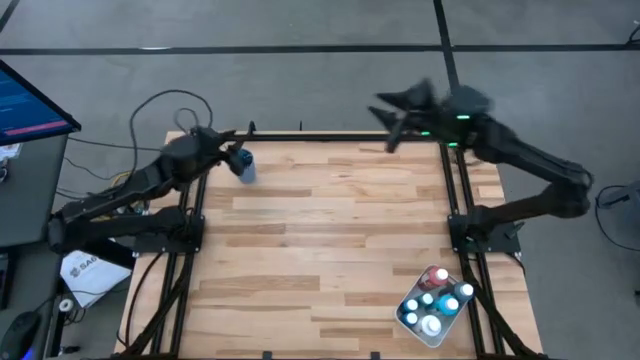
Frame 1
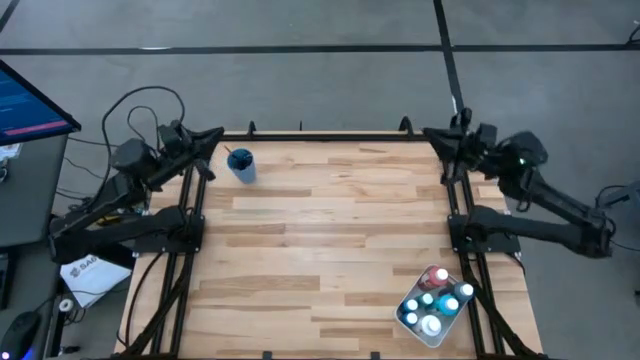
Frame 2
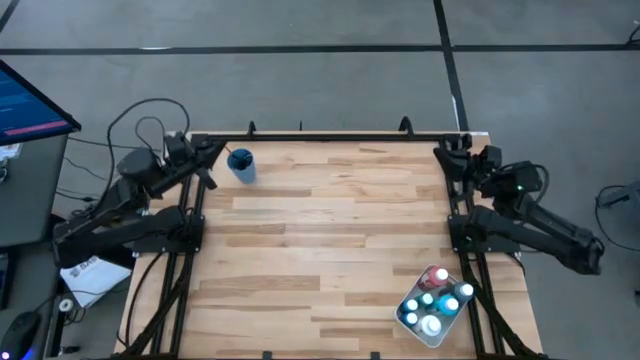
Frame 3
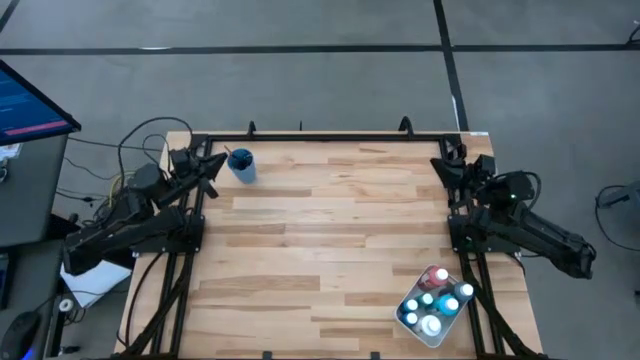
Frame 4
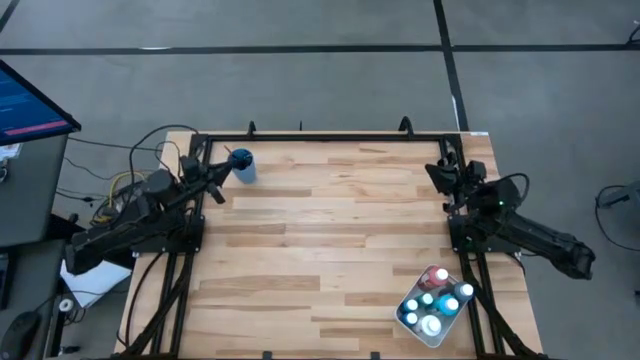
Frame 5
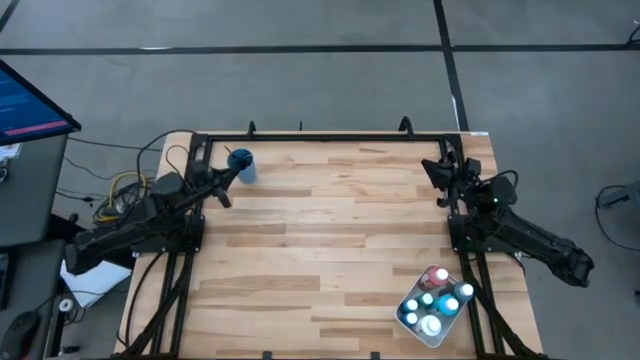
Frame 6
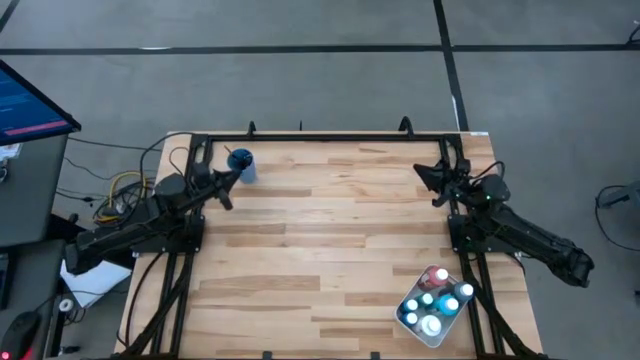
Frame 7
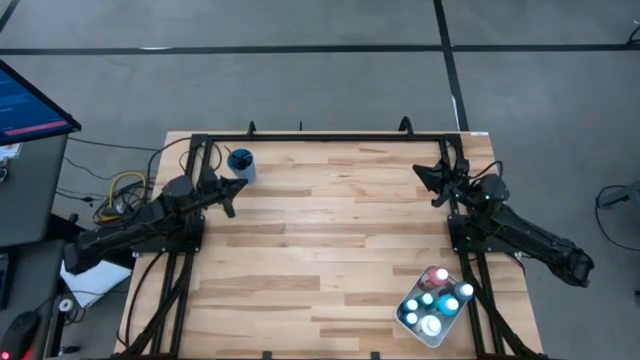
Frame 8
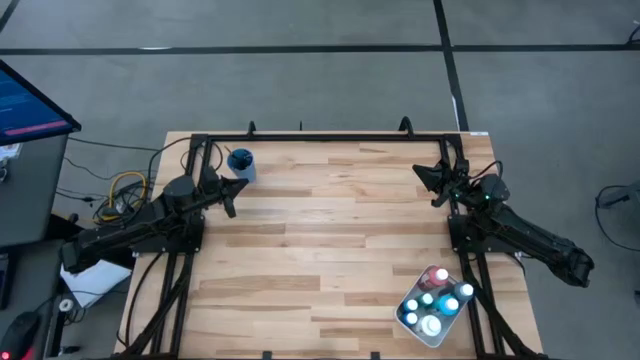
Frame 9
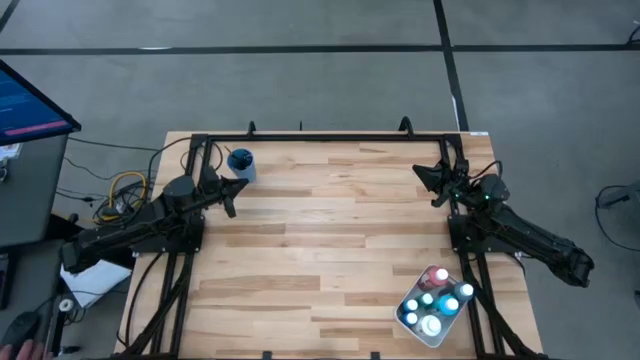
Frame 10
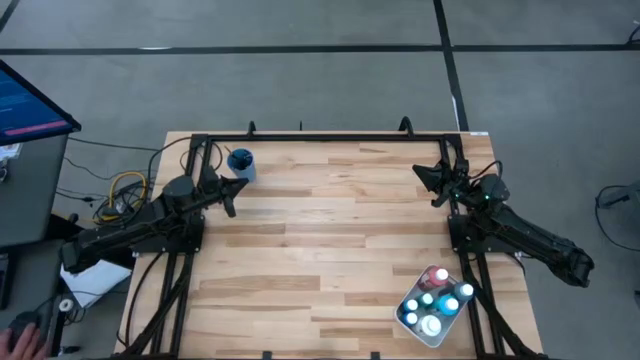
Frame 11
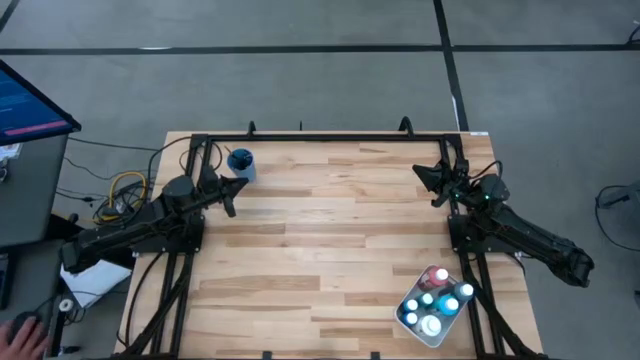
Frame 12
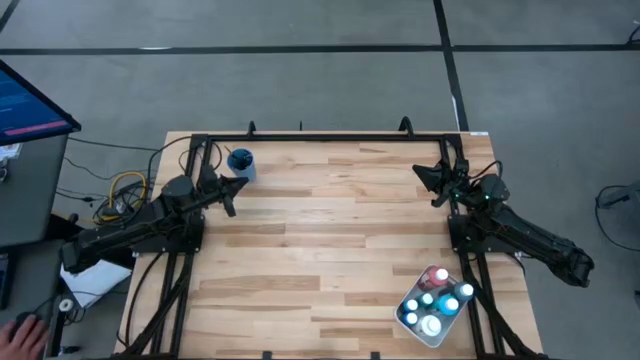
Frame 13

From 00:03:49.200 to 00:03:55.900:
Task: Pick & Place Paint Supplies
Return to Home Position

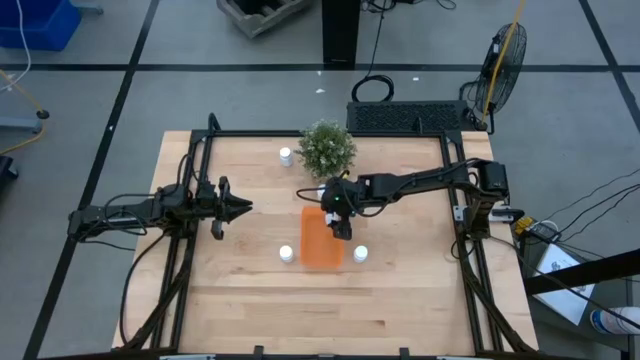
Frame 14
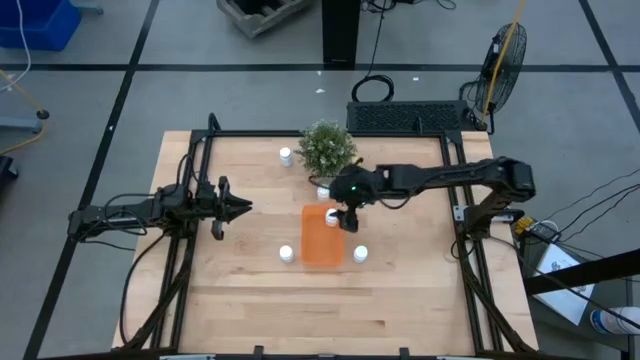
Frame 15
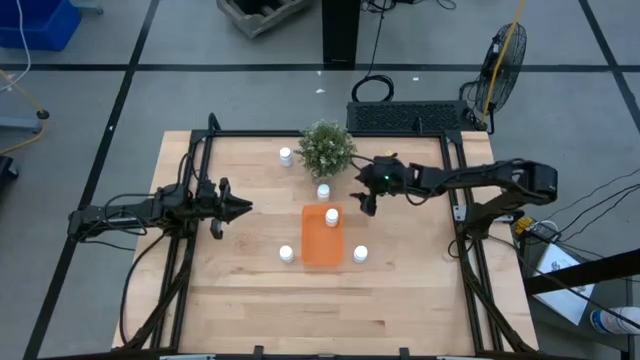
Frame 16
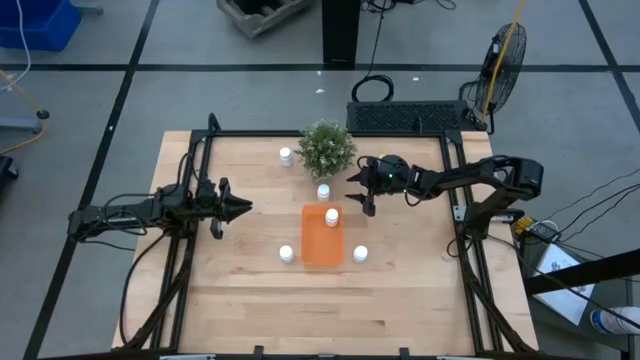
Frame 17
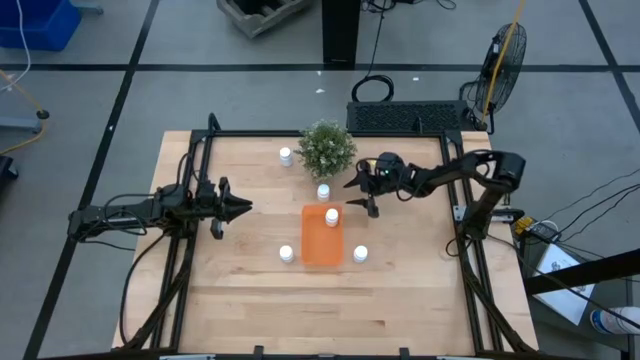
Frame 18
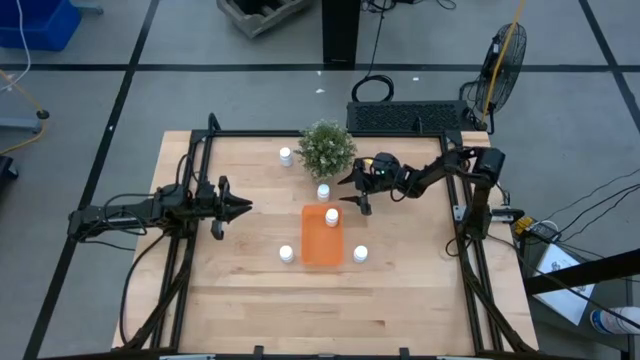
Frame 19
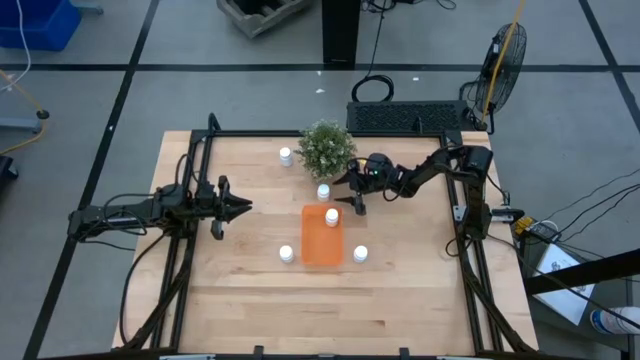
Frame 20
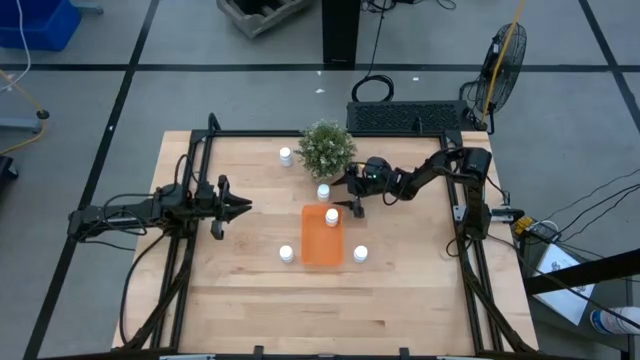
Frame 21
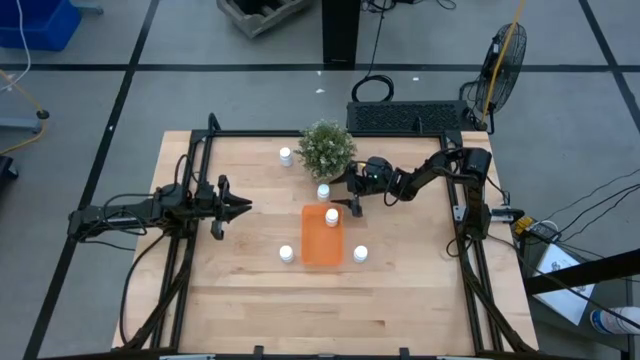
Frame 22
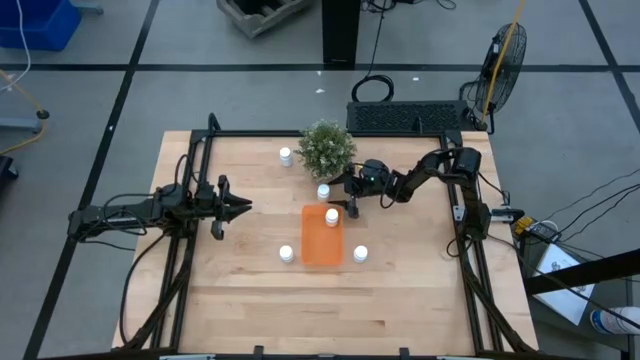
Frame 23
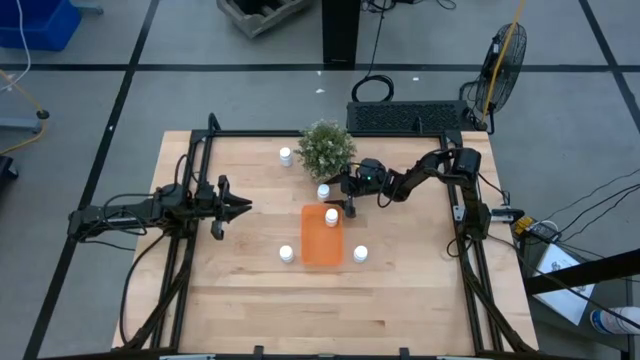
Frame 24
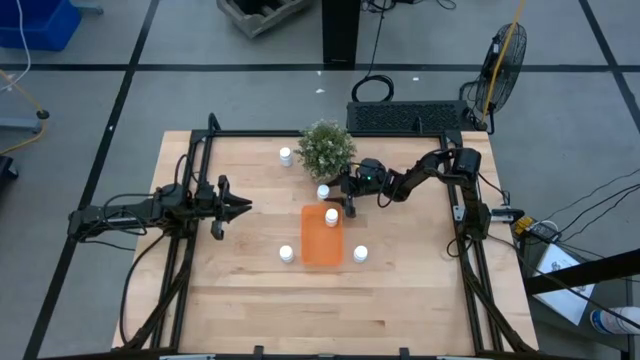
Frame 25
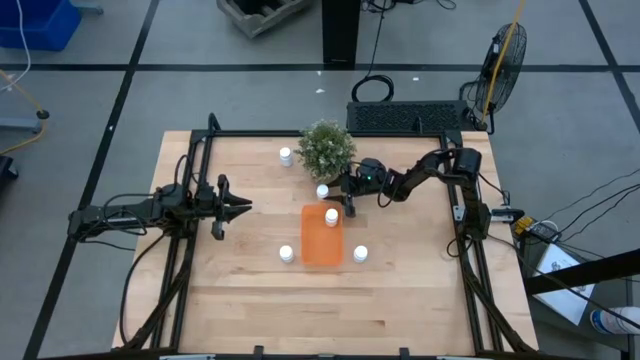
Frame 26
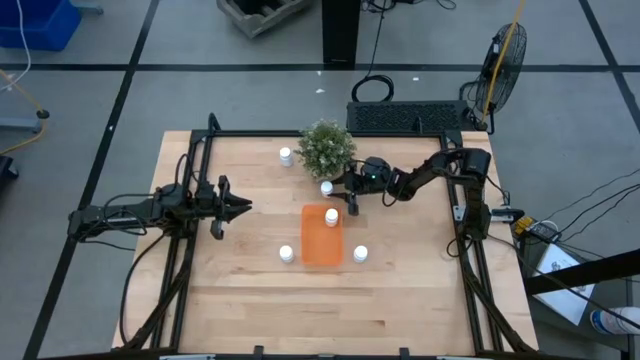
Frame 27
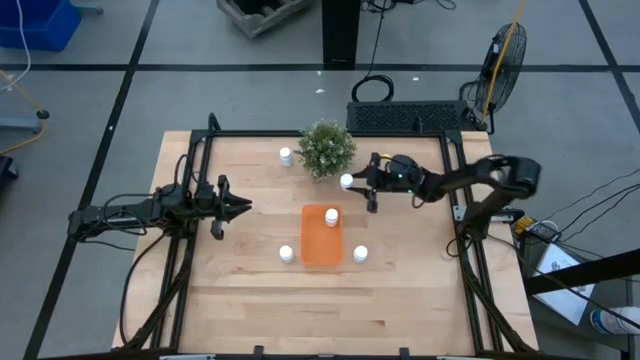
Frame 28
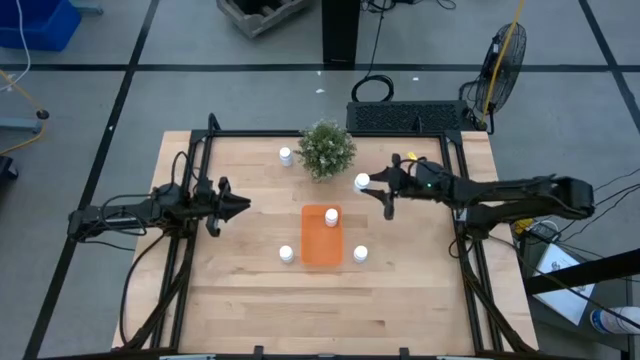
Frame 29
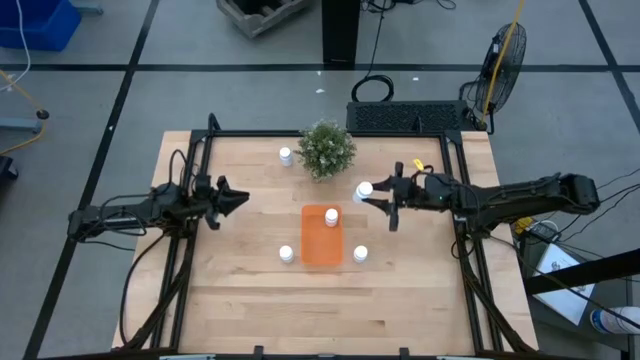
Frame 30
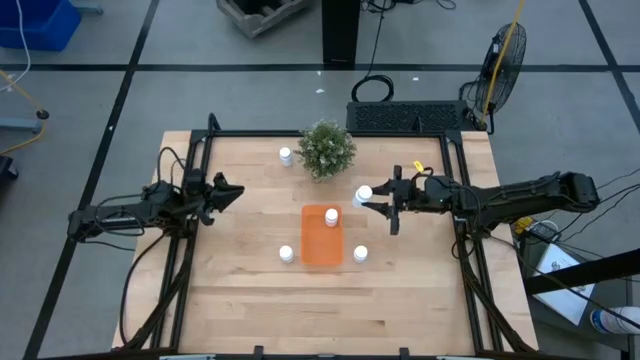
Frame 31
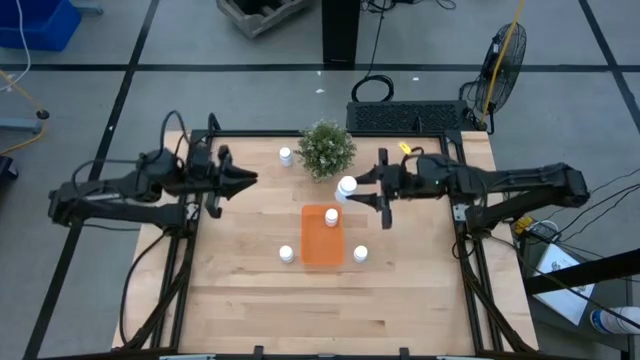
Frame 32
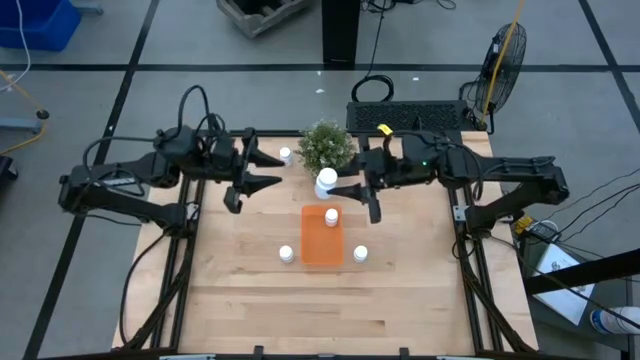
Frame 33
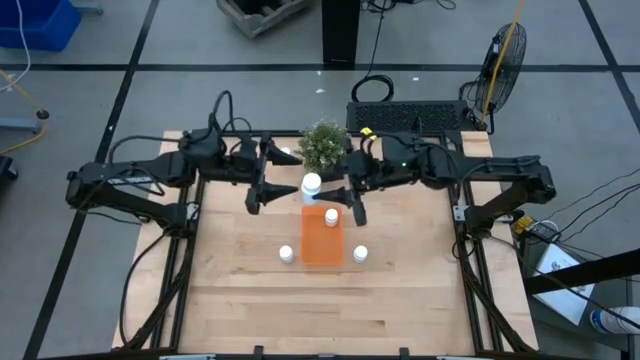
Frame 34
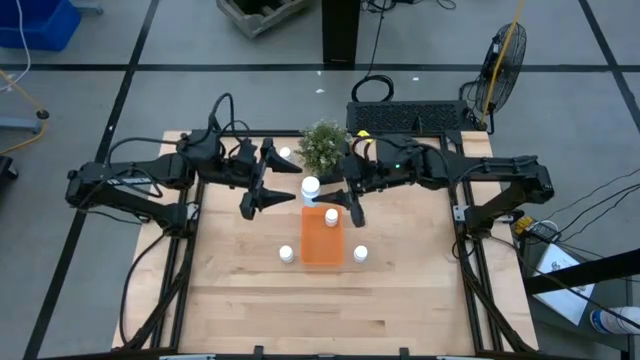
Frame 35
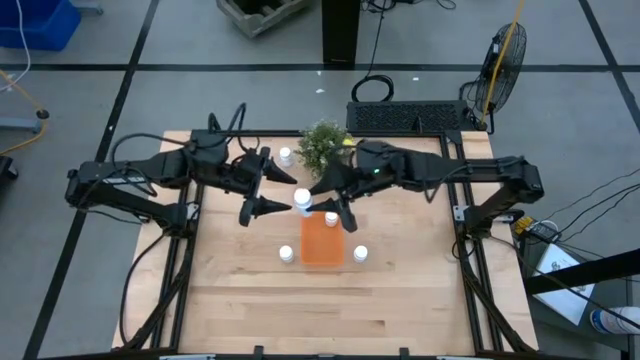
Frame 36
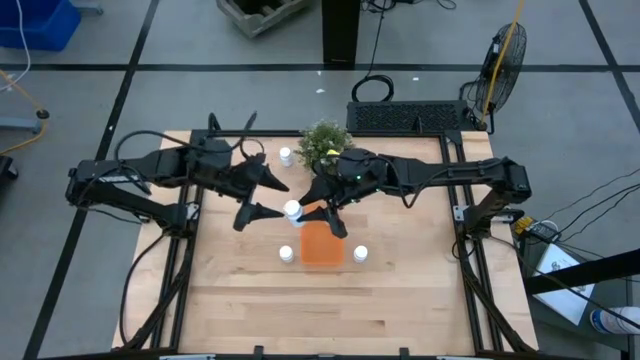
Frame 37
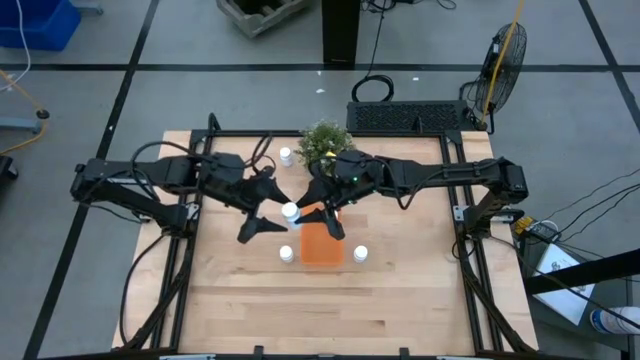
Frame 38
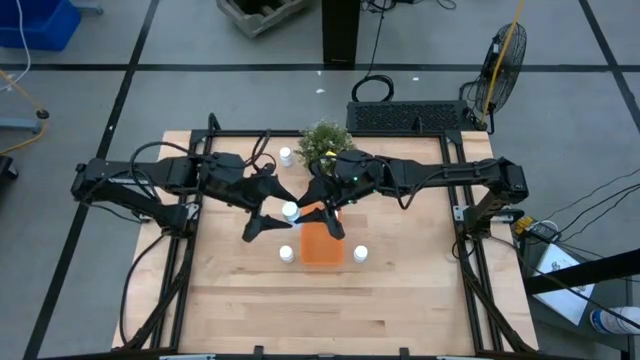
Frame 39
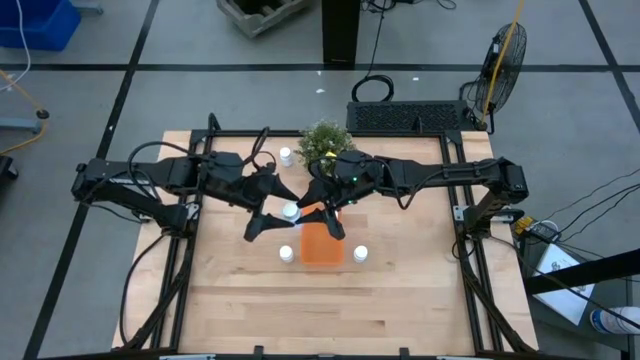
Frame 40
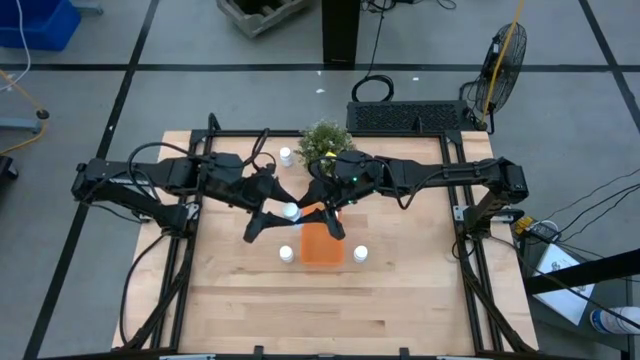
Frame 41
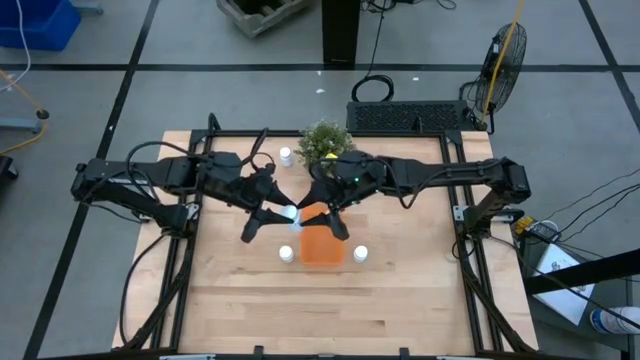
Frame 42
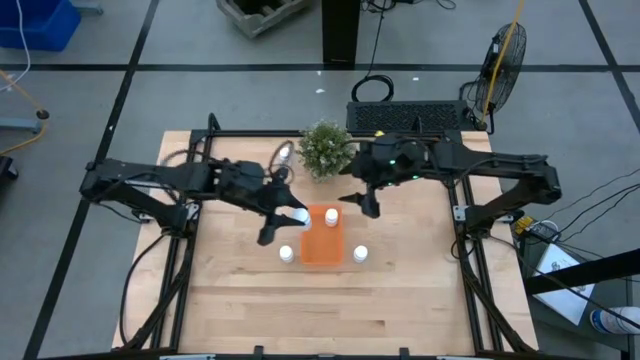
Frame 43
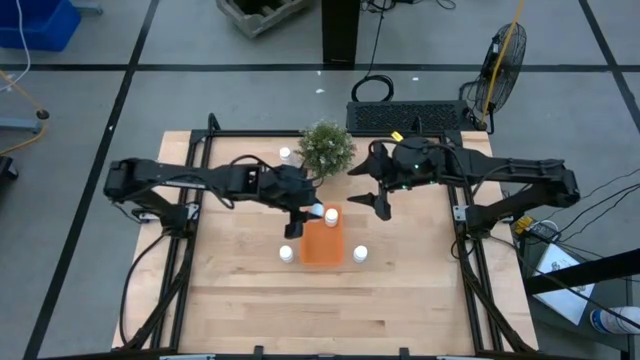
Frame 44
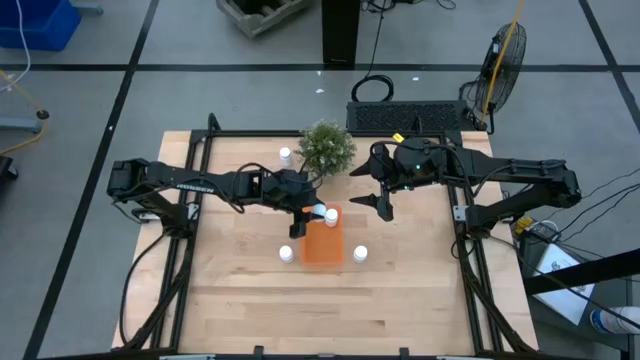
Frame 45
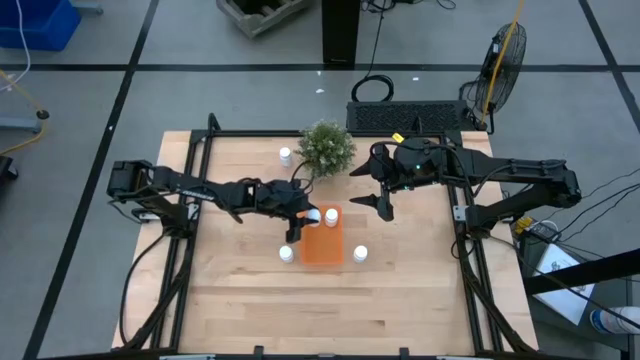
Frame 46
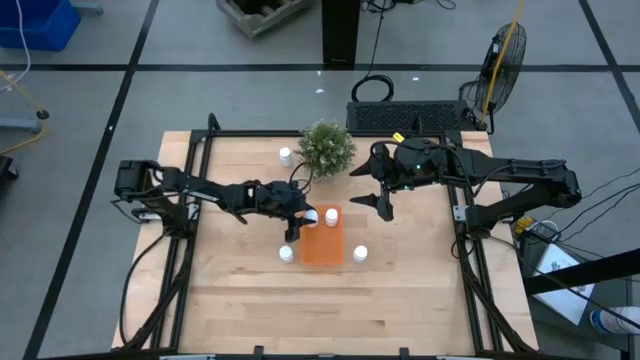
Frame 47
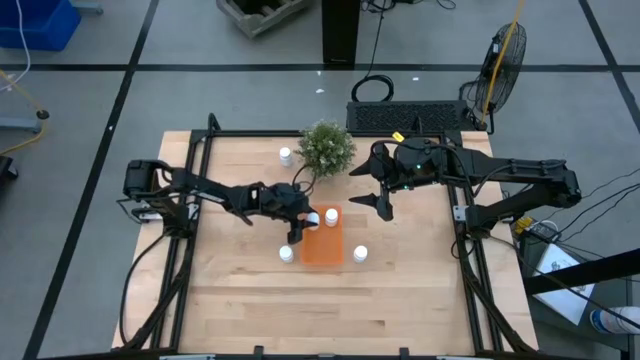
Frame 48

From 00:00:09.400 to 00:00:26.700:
Task: Pick and place pill bottles into a basket
Put the white medicine bottle into the orange bin
